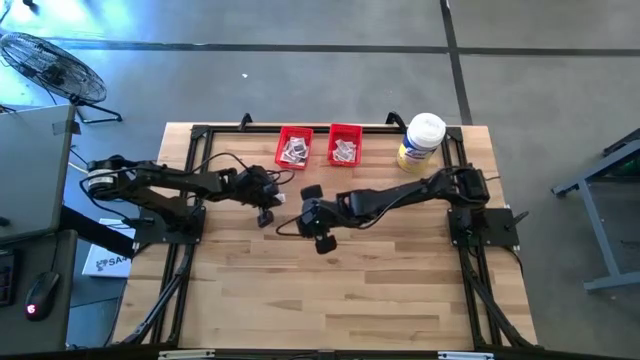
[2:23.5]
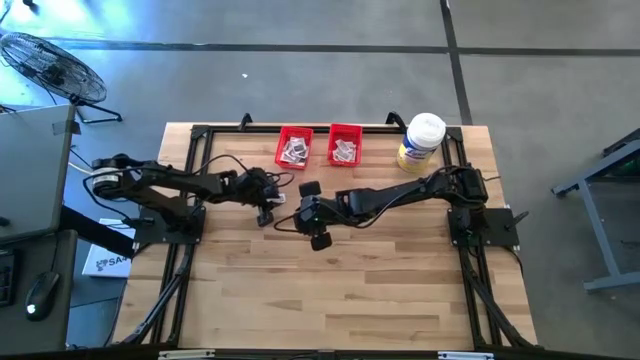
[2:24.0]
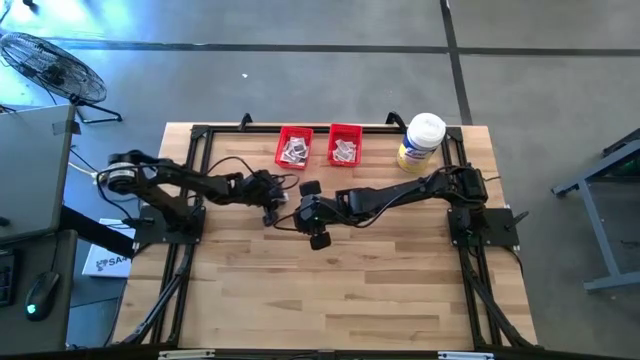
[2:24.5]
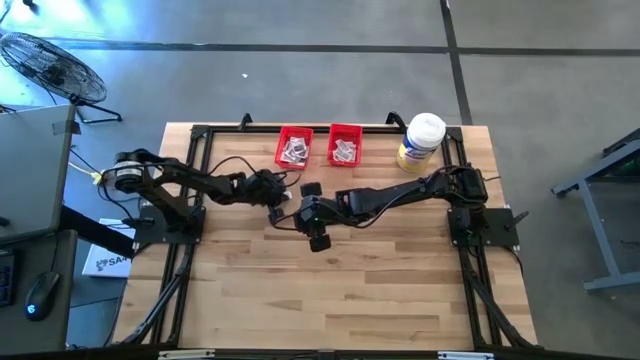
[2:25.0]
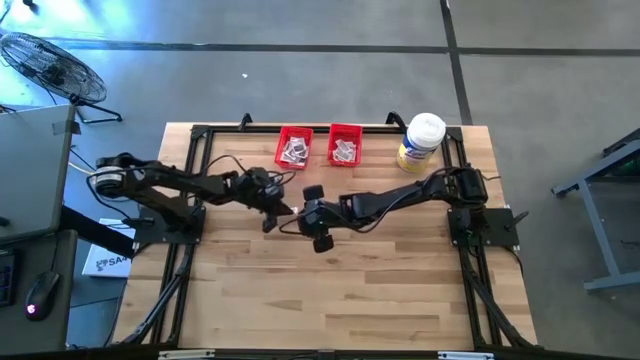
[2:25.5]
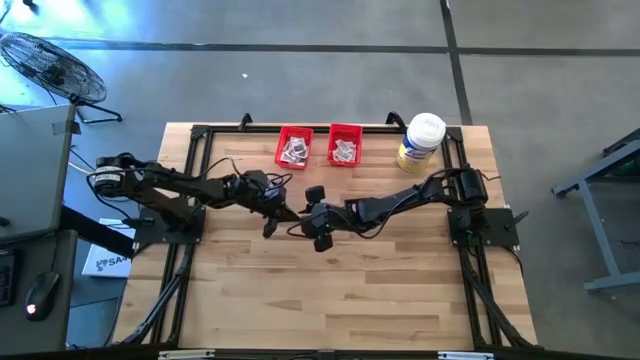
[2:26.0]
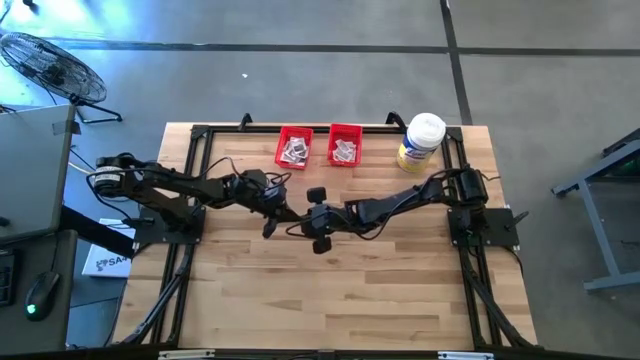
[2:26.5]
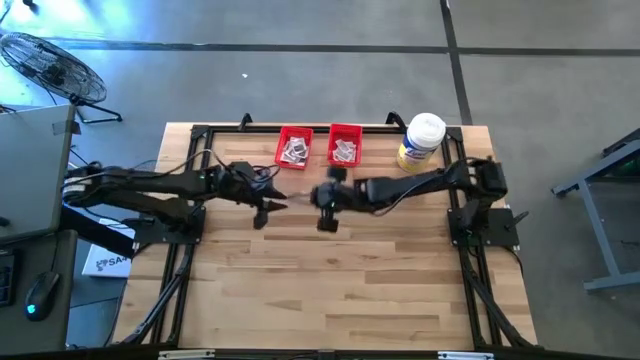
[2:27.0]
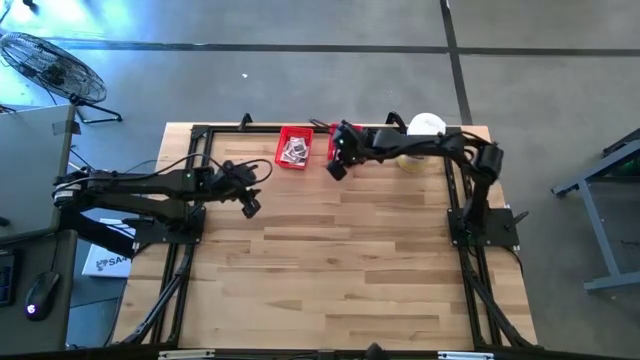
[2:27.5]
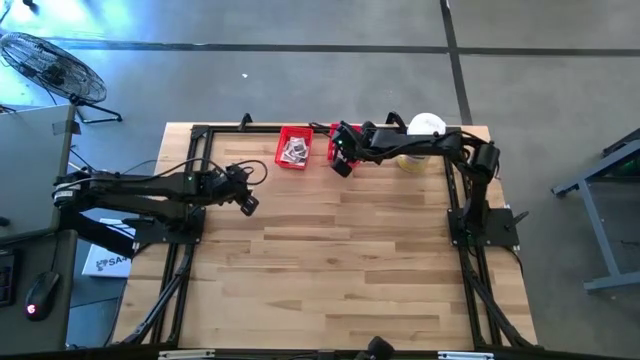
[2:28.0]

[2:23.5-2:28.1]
Task: Pick & Place First Aid Supplies
Put the ointment pack into the right red bin

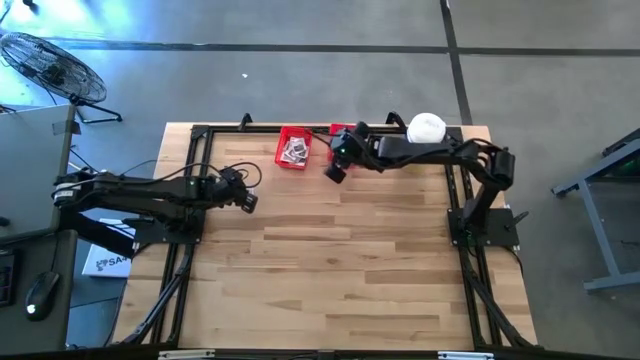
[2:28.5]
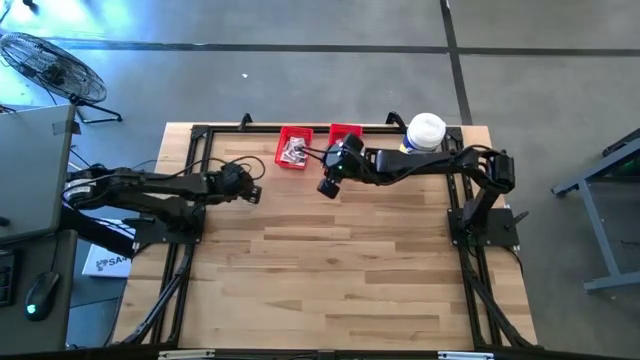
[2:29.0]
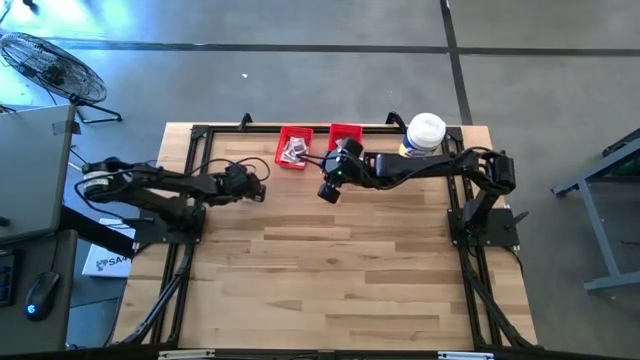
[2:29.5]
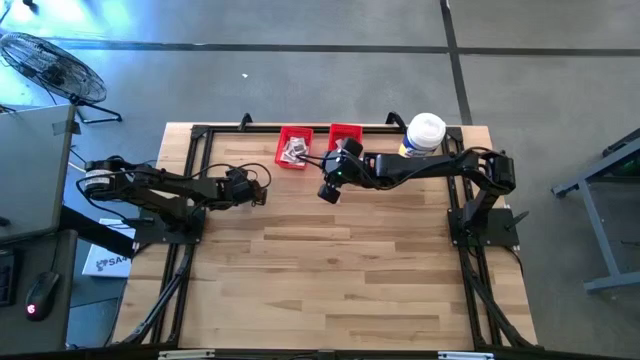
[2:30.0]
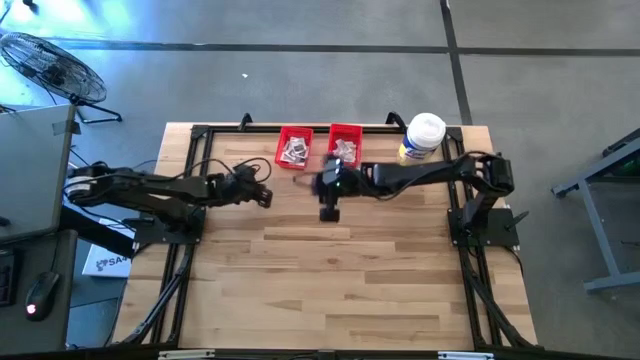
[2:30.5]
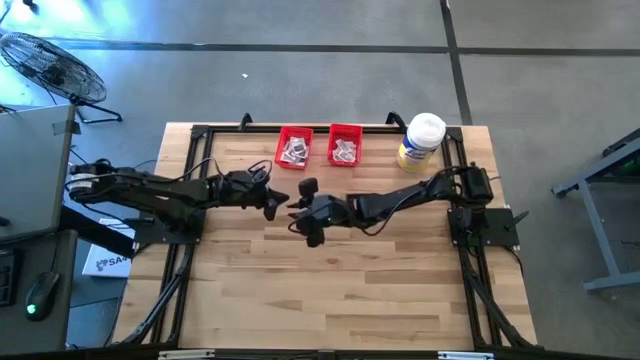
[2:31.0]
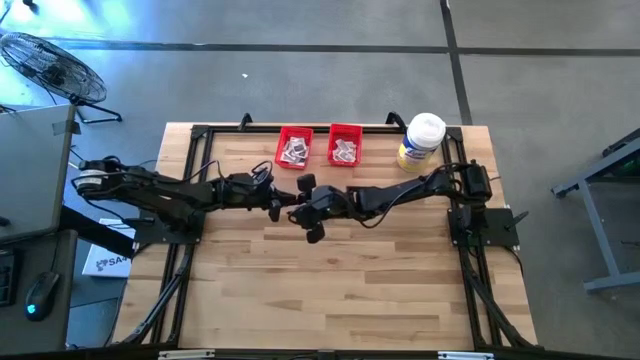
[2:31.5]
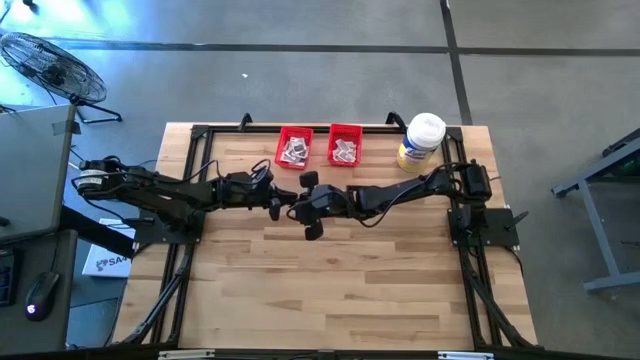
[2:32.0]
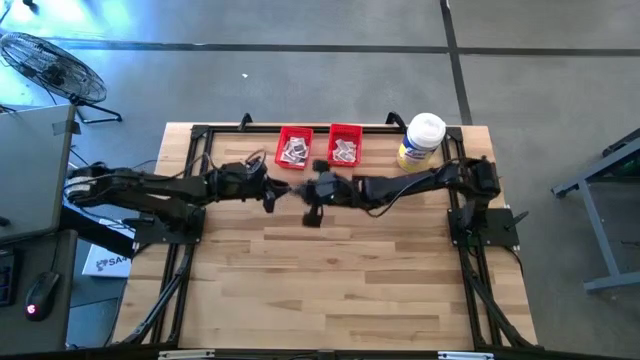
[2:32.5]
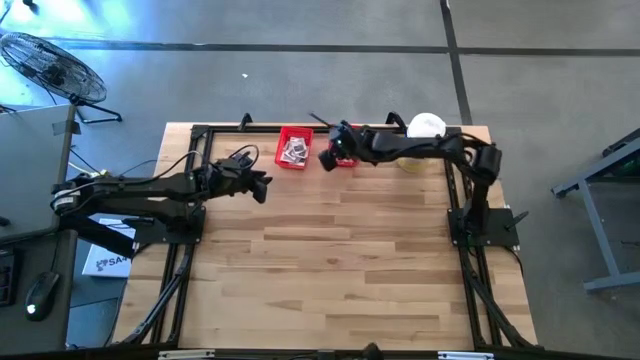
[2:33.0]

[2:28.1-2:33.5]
Put the ointment pack into the right red bin

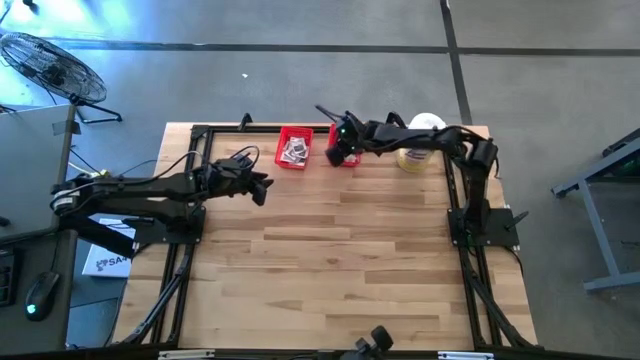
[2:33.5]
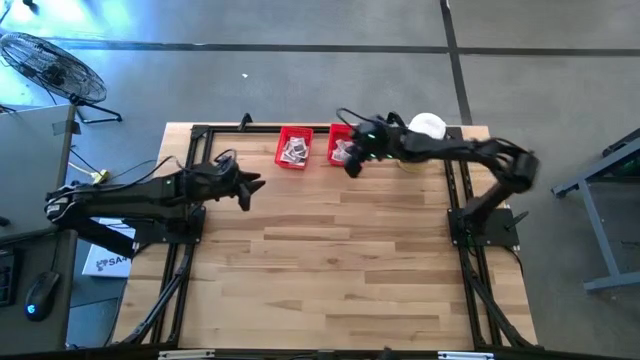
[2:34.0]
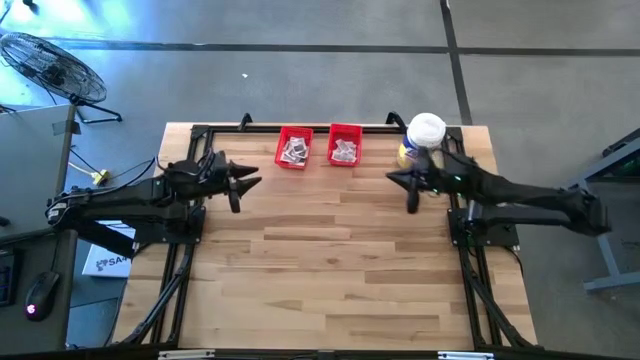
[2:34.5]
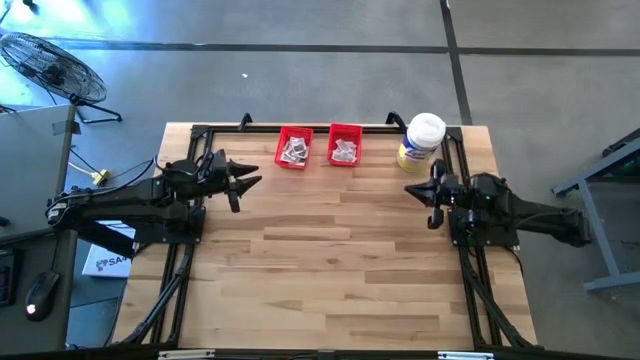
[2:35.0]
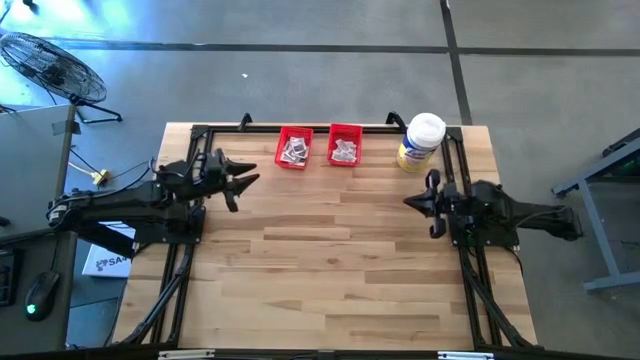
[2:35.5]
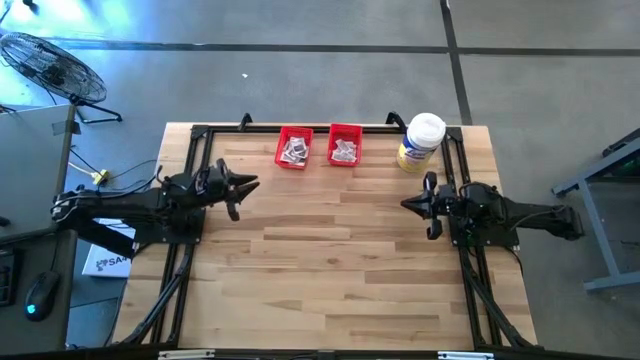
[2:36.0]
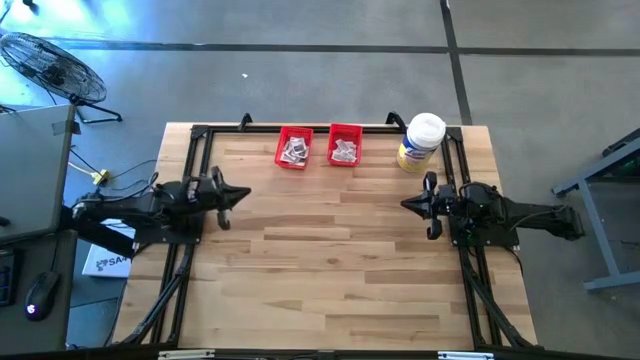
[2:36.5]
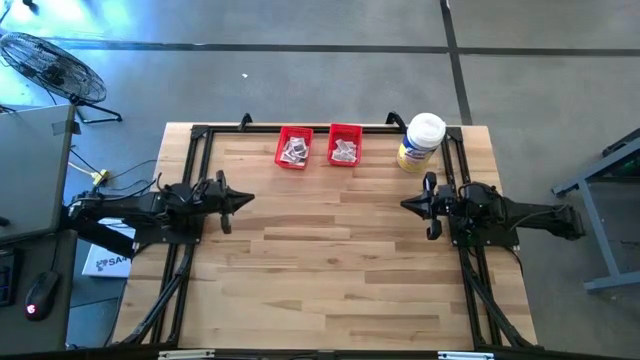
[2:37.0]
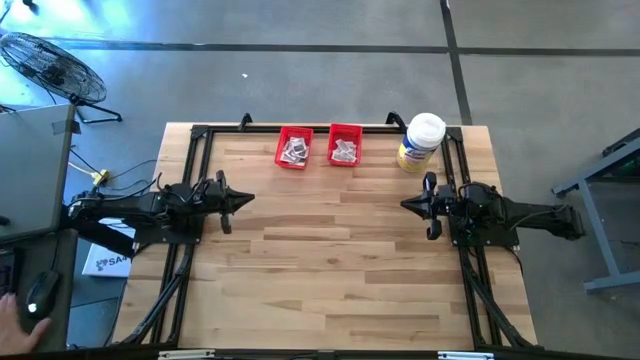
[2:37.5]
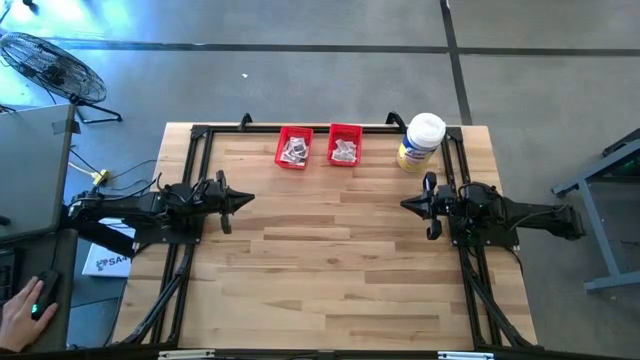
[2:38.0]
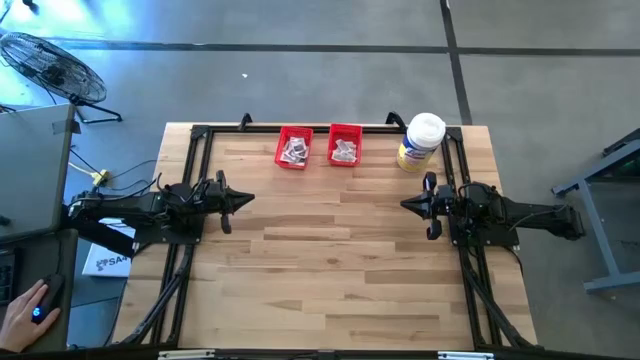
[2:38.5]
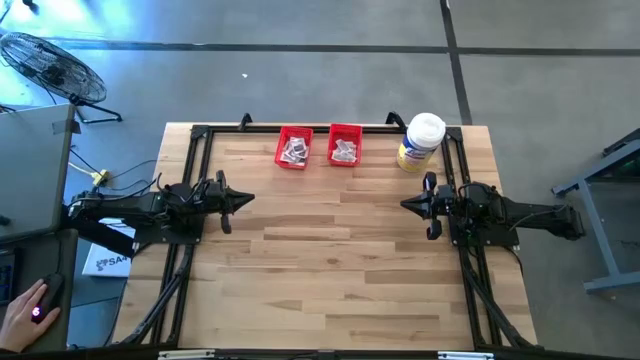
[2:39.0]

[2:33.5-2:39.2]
Return to Home Position

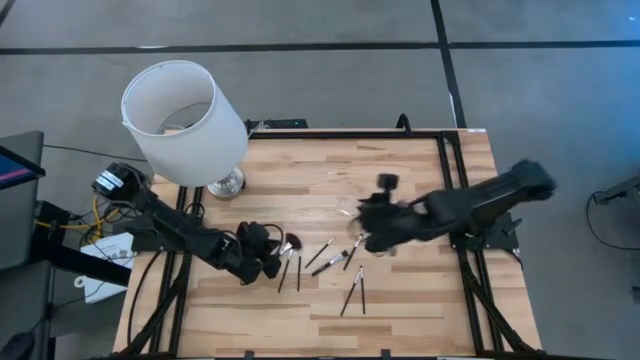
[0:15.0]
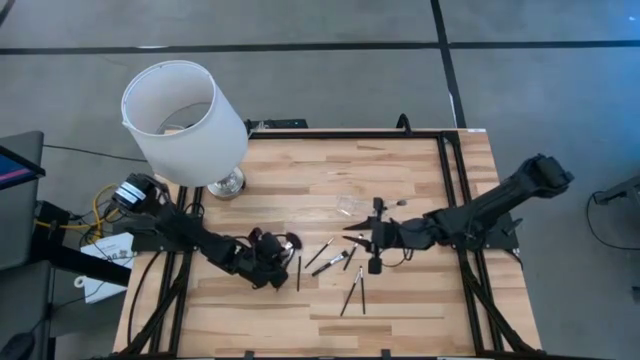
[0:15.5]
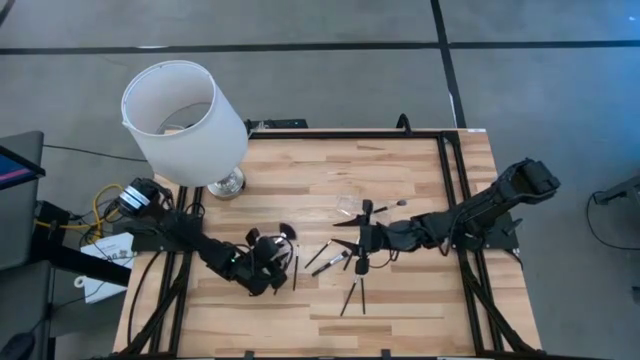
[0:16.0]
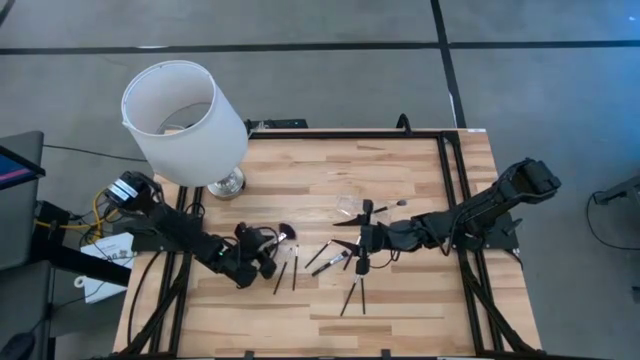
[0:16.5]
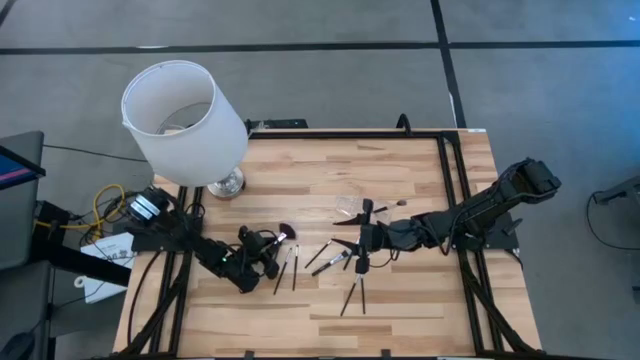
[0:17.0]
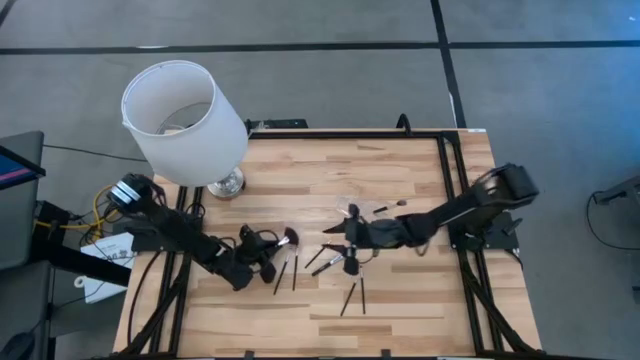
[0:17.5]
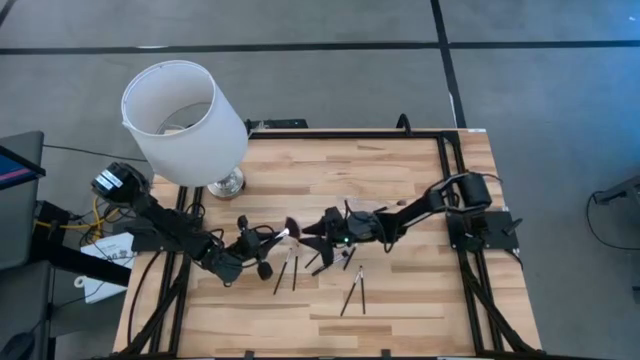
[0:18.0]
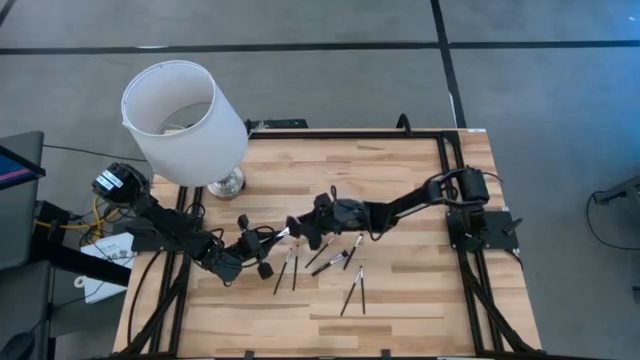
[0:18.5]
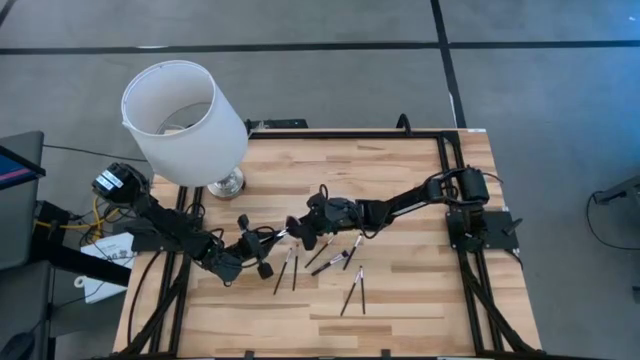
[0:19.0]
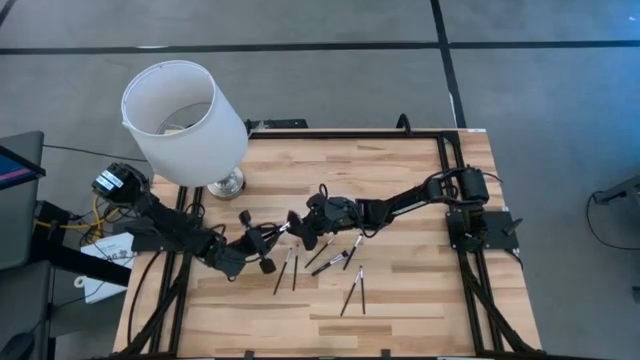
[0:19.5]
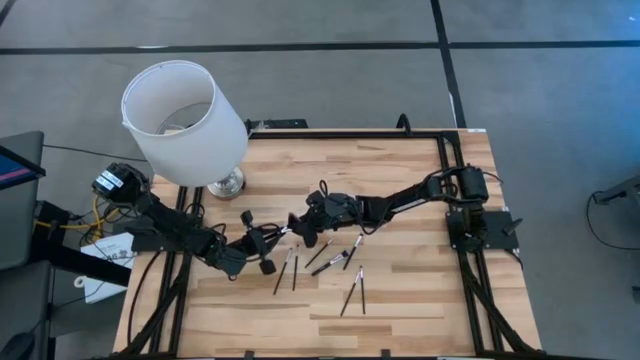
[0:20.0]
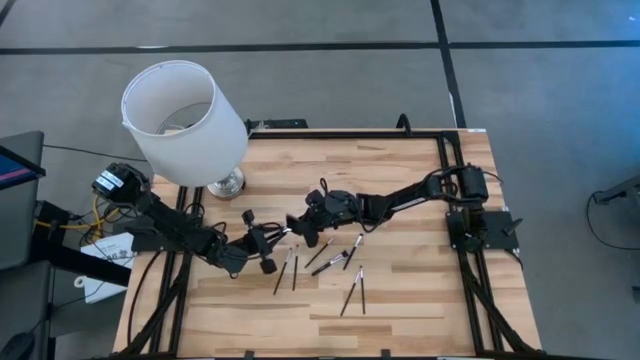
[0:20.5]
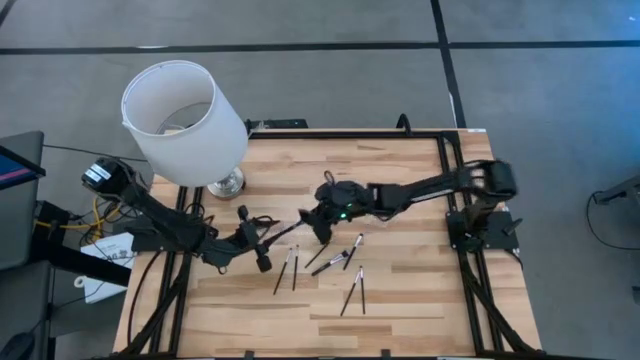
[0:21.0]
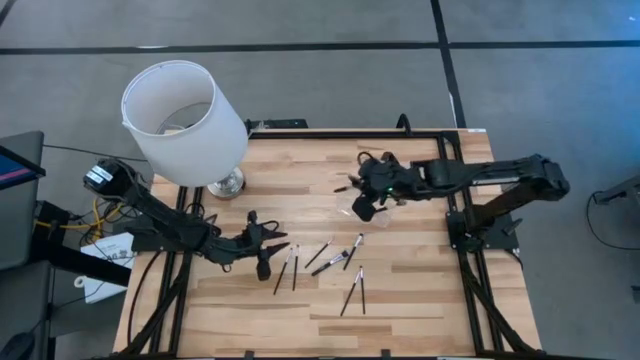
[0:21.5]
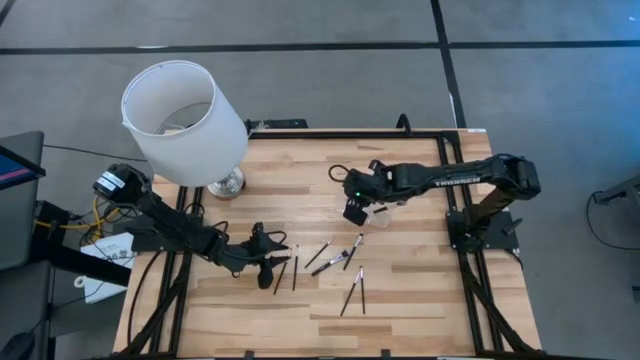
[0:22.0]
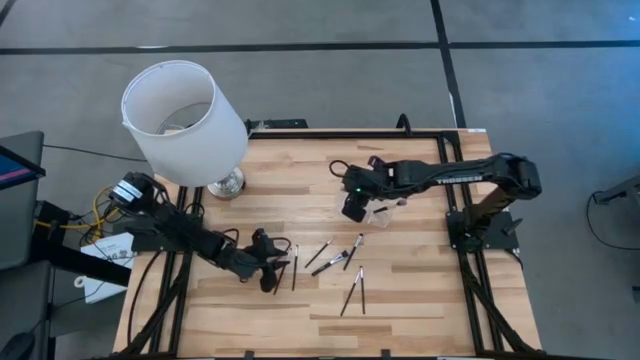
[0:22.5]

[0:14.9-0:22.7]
Task: Put items in baskets/containers
Put the black highlighter brush into the transparent organizer
